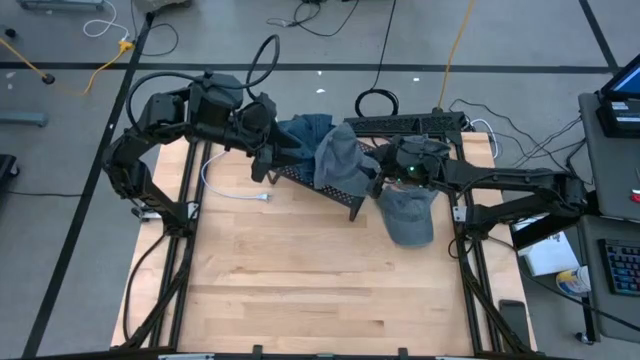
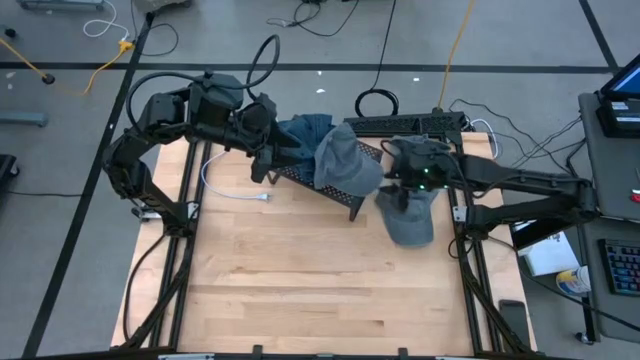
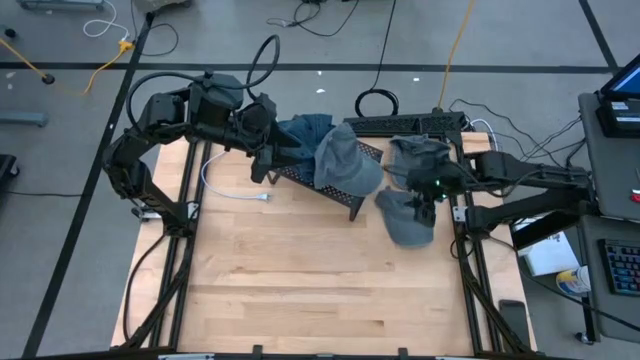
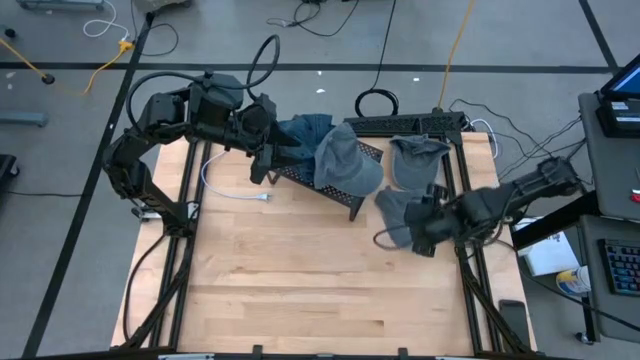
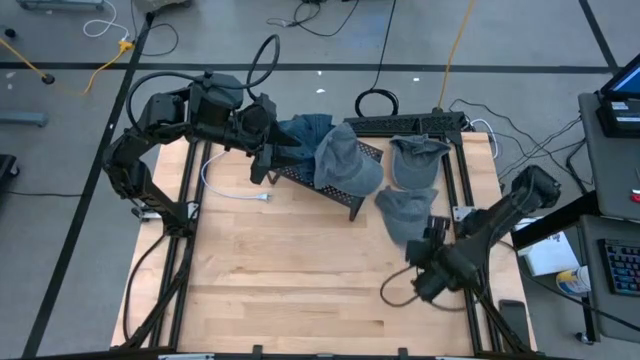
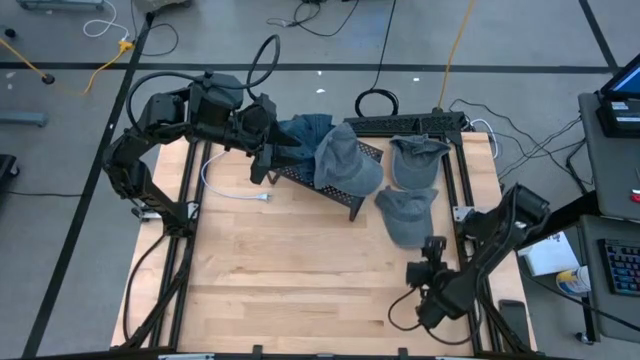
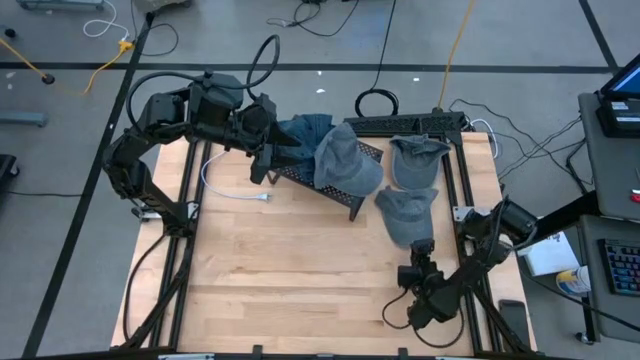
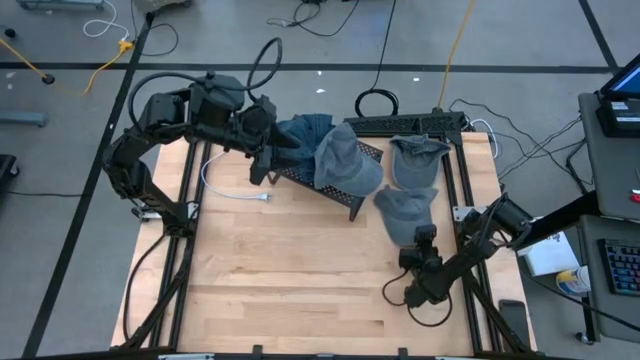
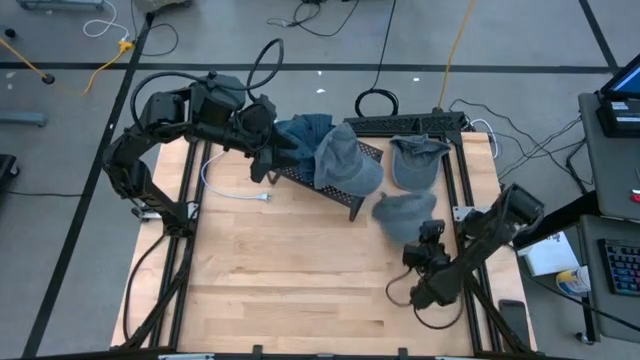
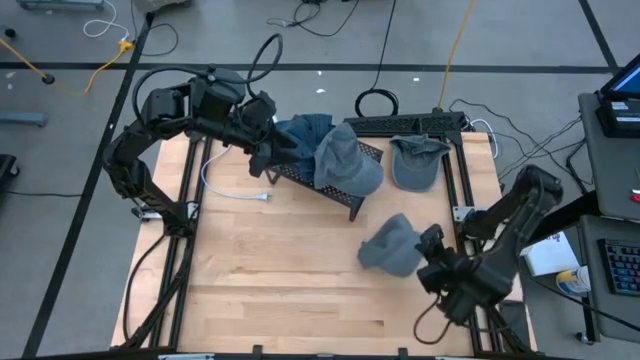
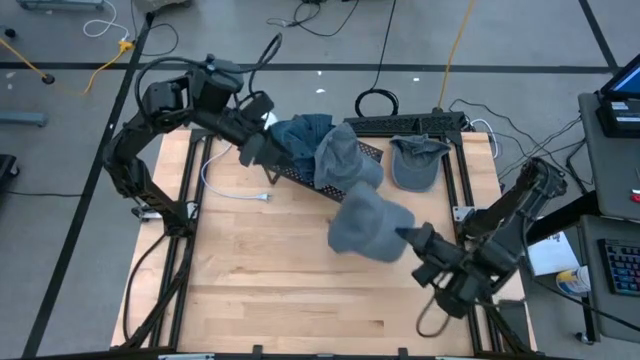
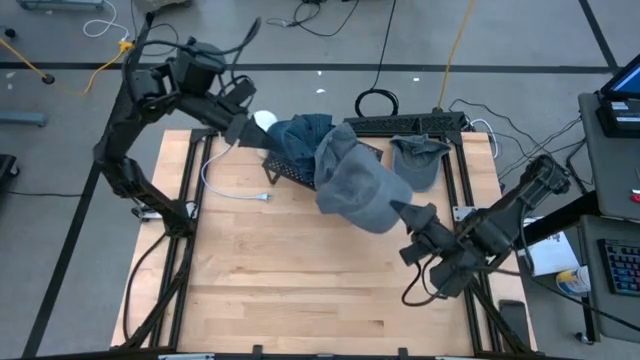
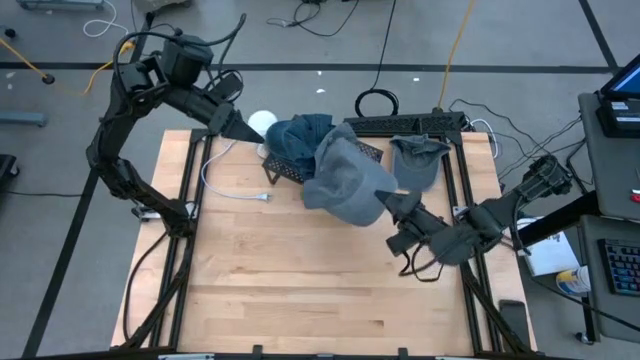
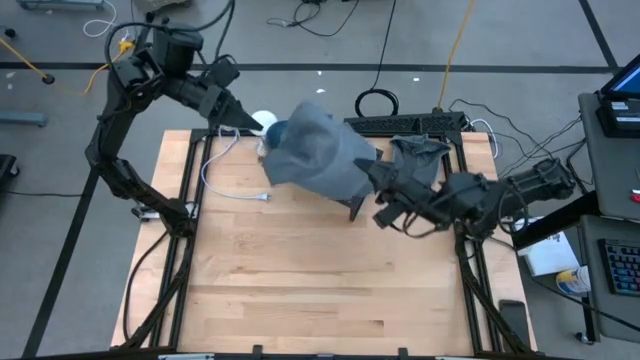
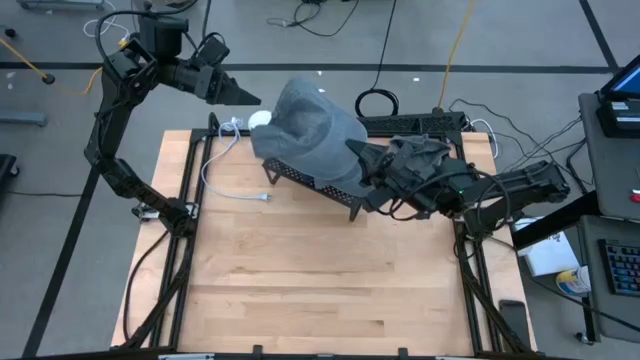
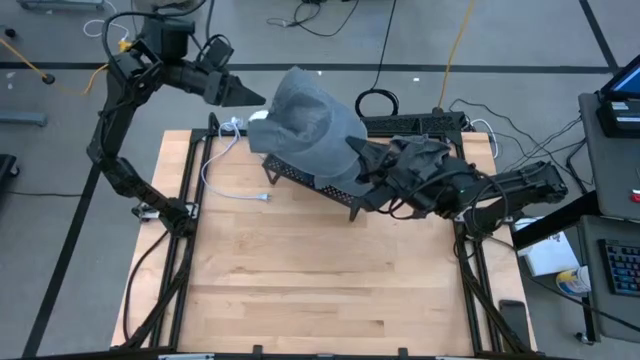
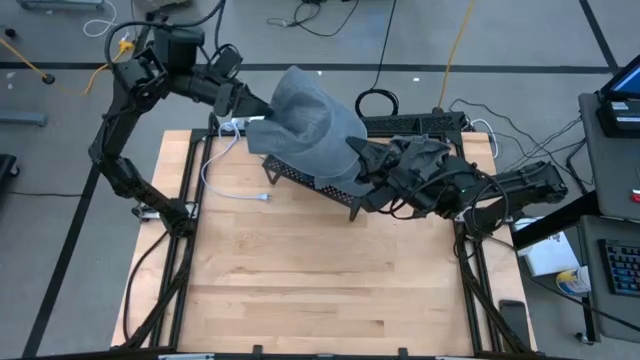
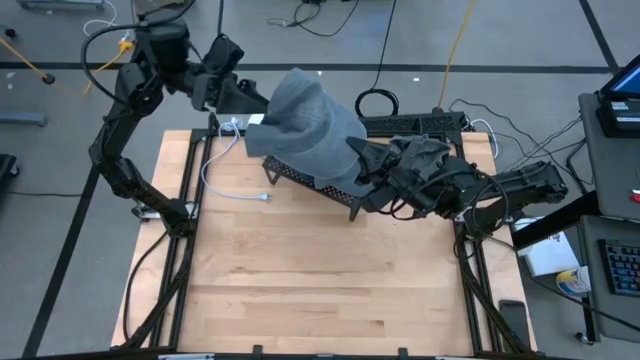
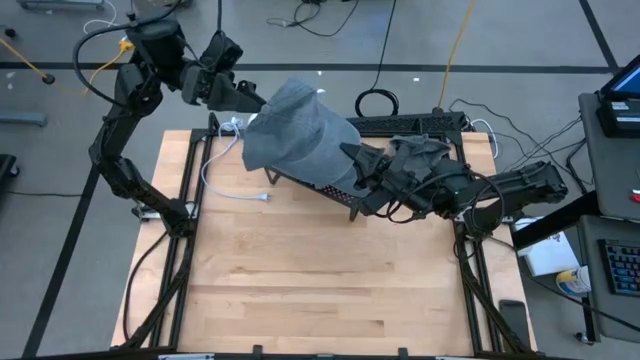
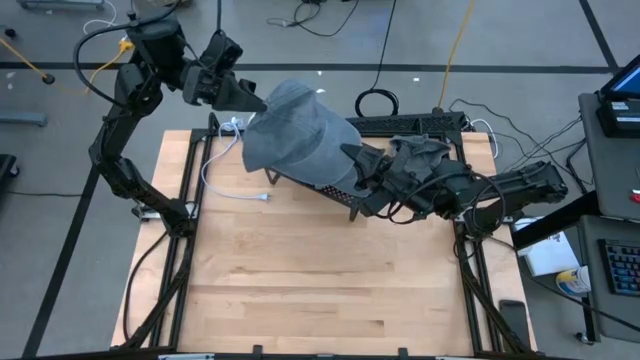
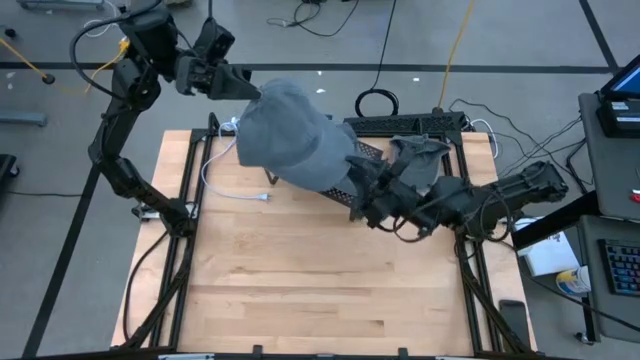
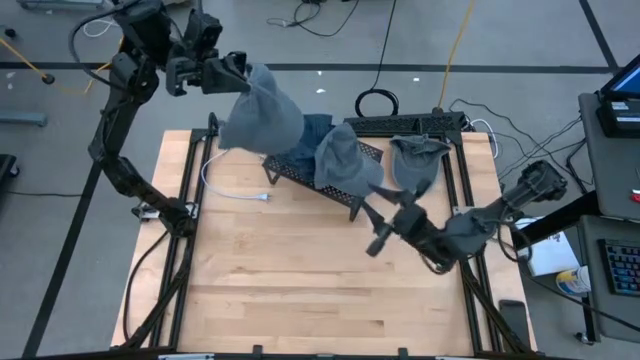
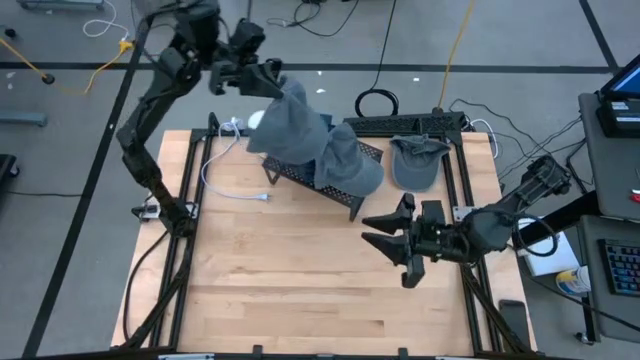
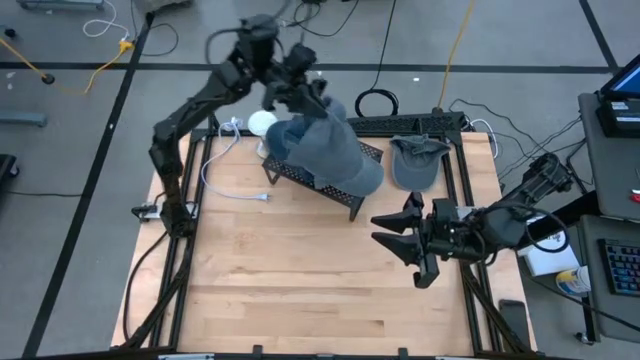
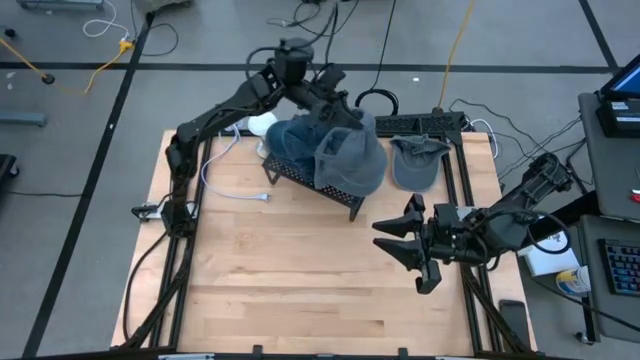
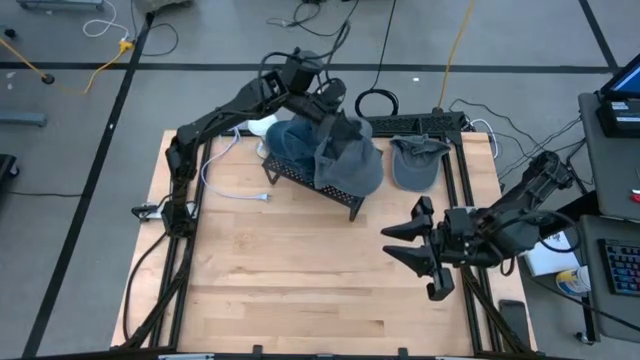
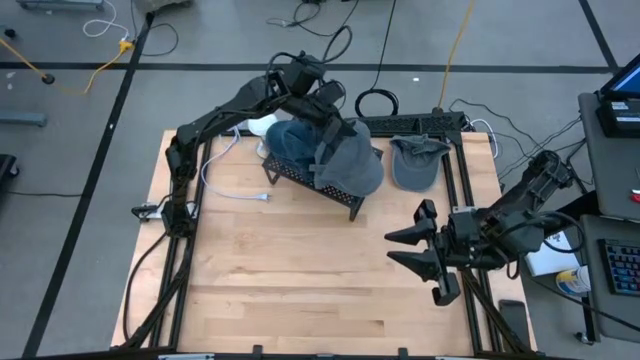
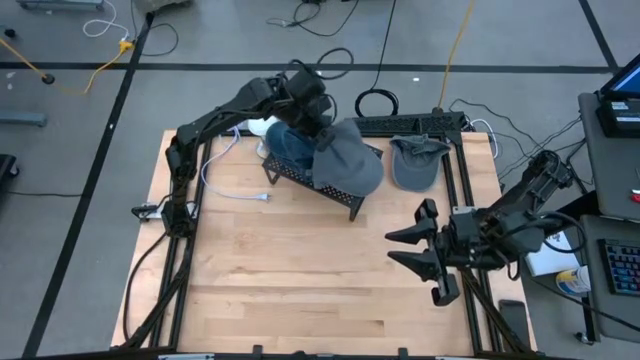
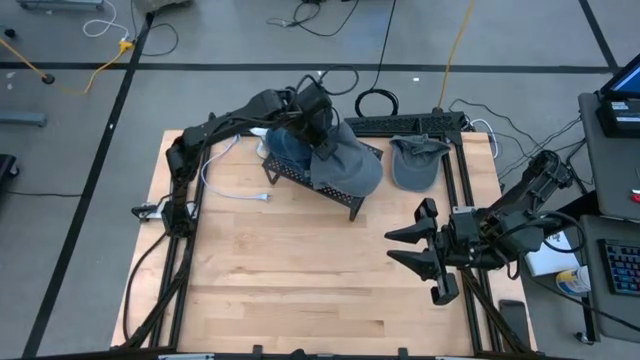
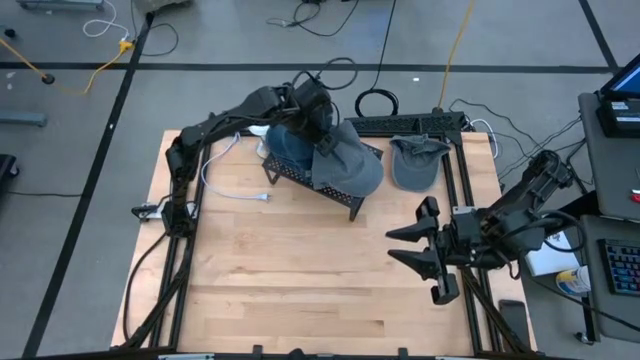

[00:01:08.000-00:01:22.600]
Task: Pick & Place hat
Stack the bottom gray cap on the gray cap on the shelf

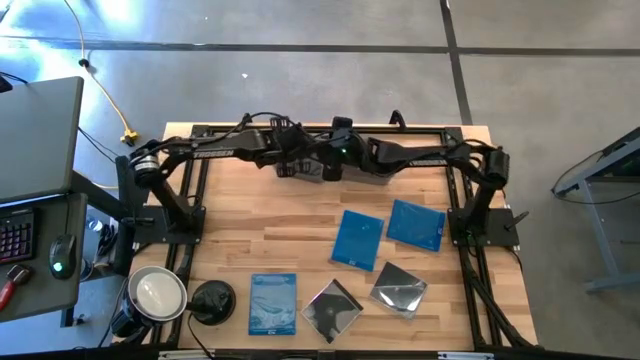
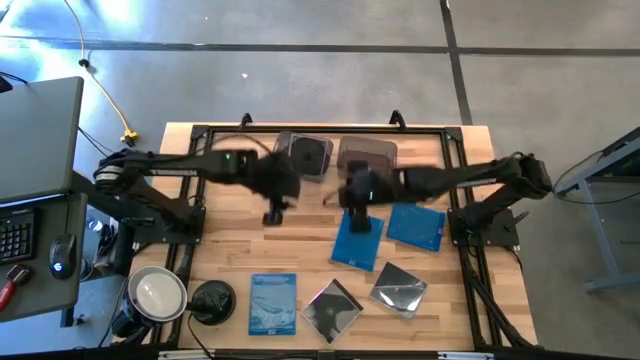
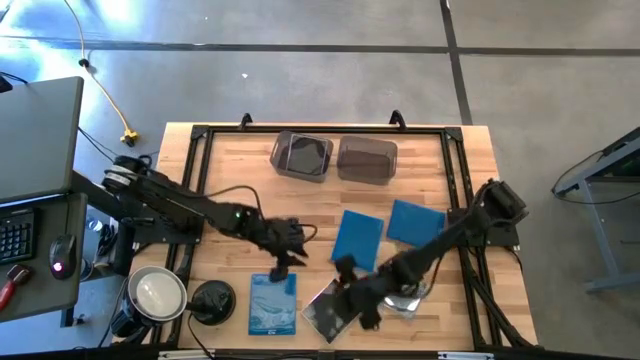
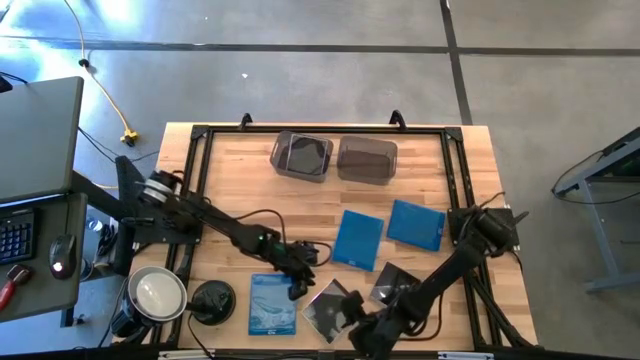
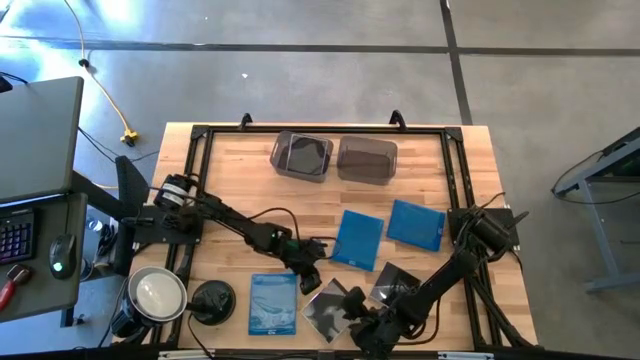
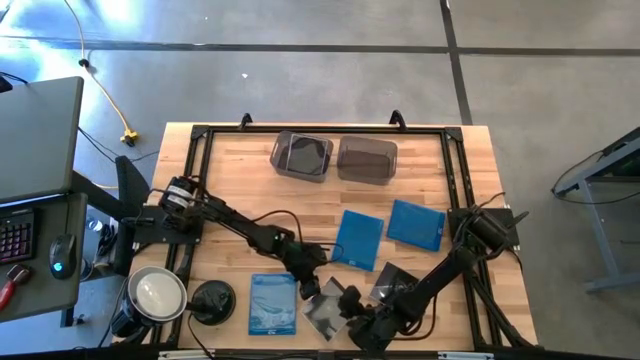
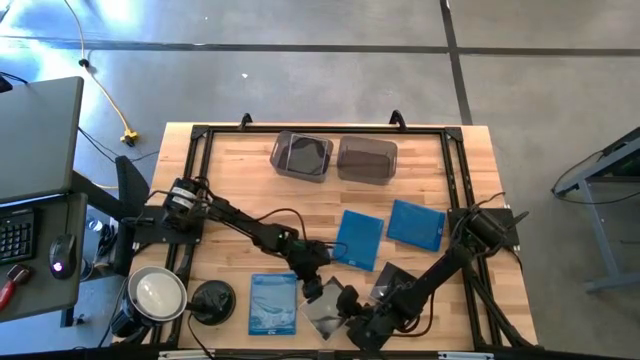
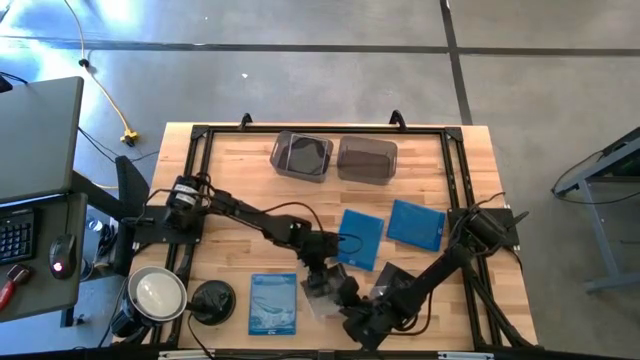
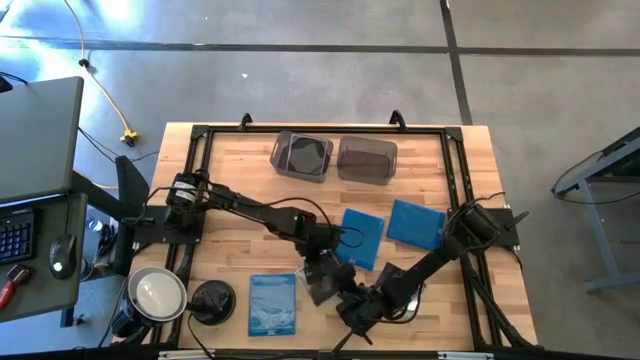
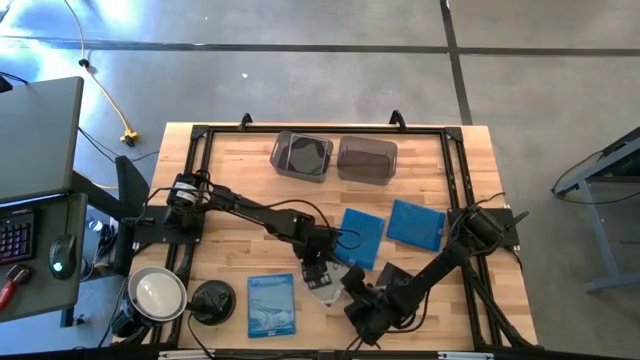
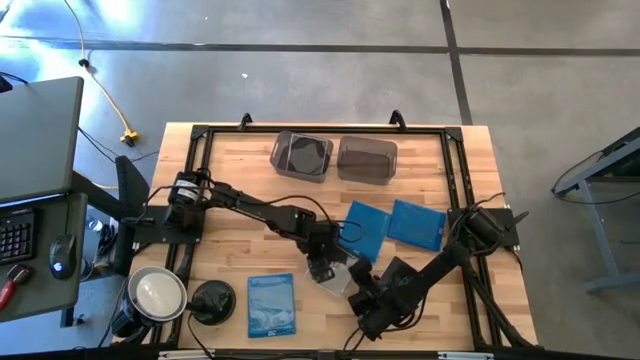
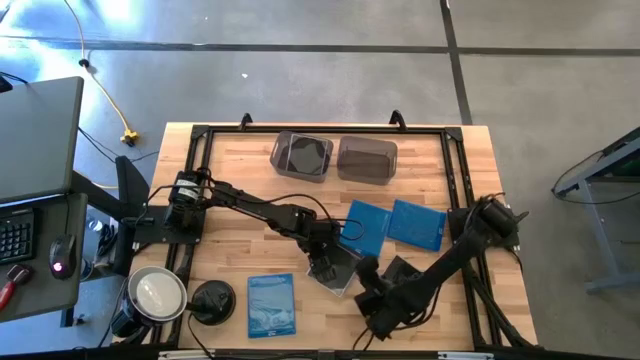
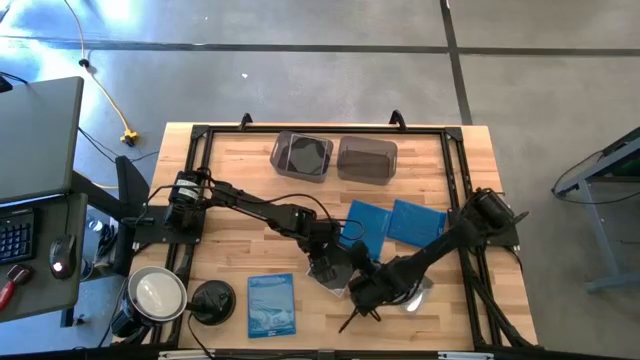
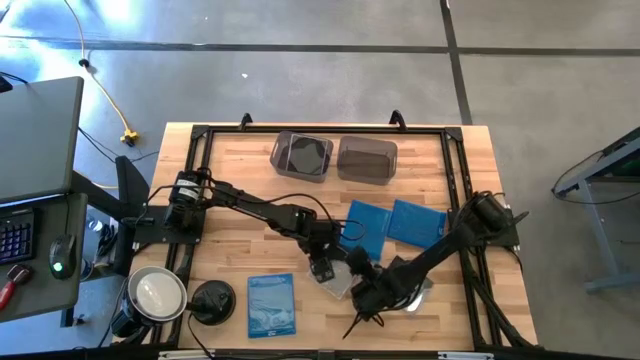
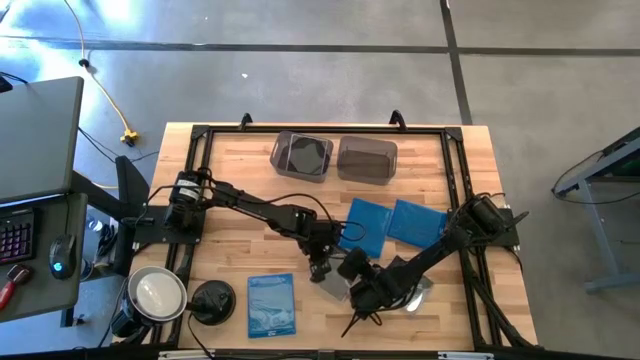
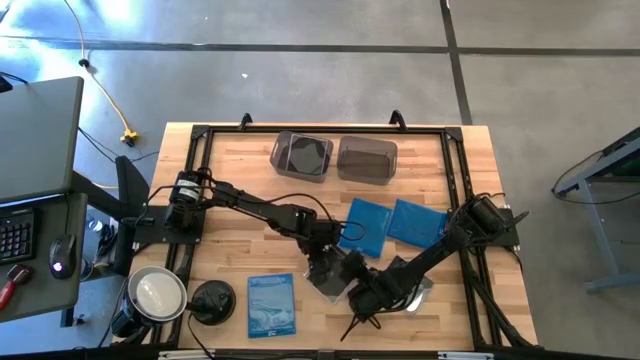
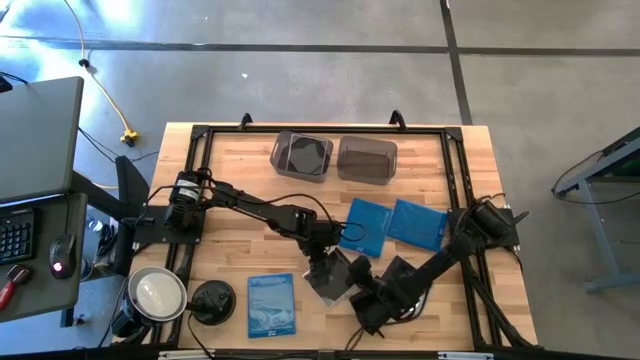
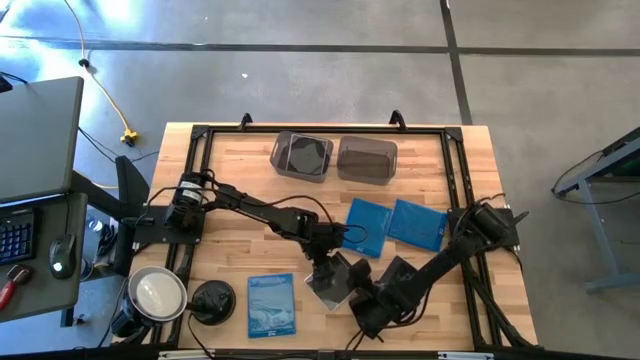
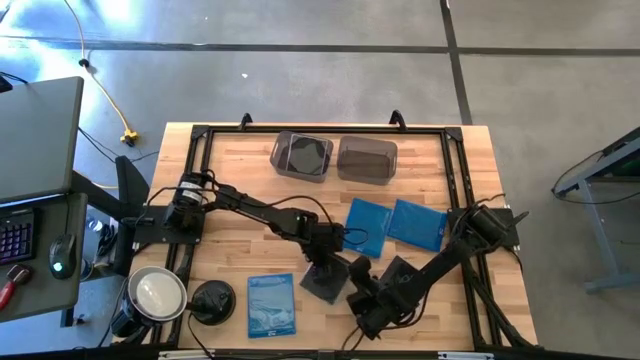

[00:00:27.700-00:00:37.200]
Task: Pick & place jewel cases by type
Put the left black cd case into the left black bin
